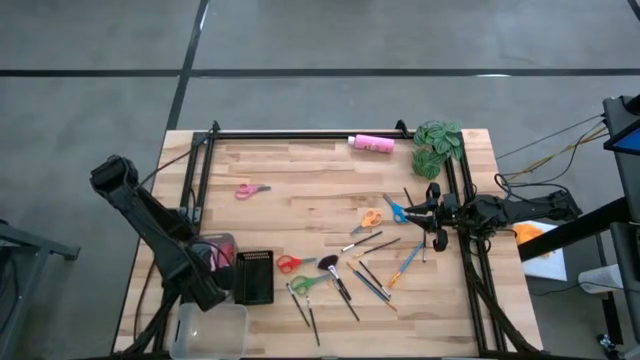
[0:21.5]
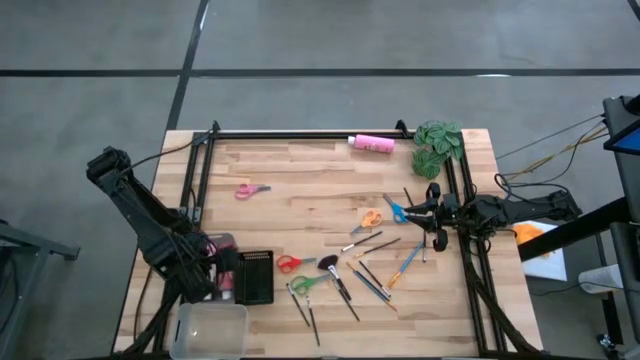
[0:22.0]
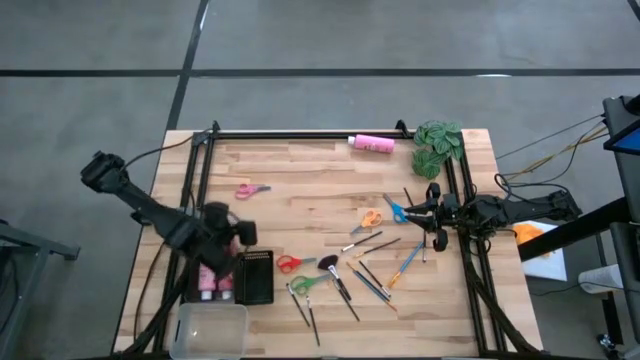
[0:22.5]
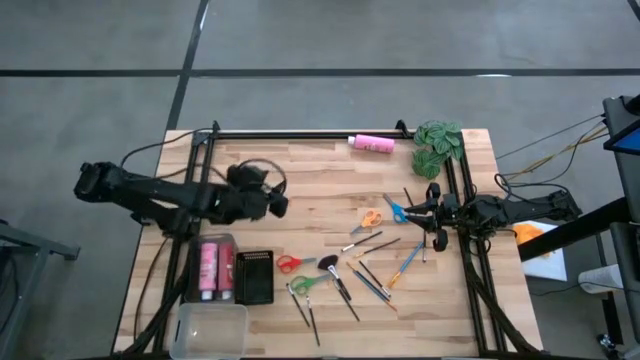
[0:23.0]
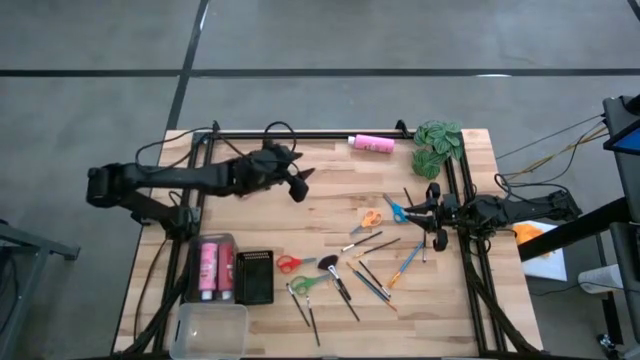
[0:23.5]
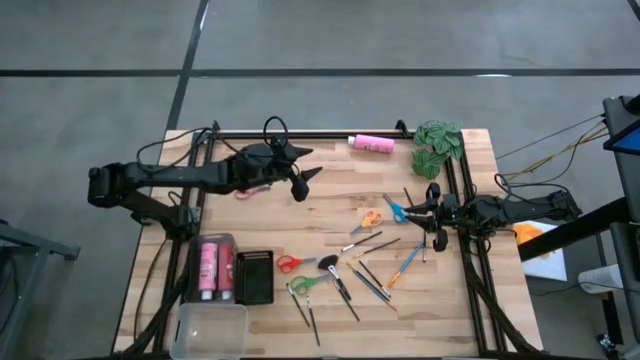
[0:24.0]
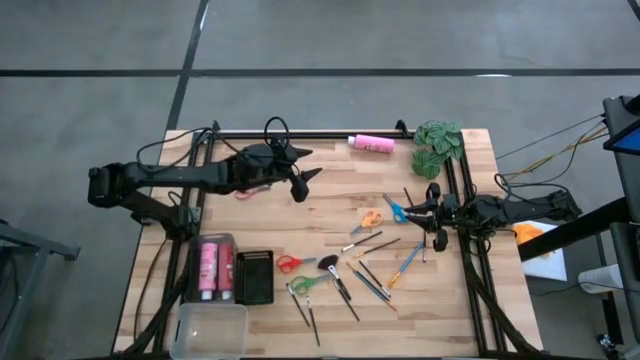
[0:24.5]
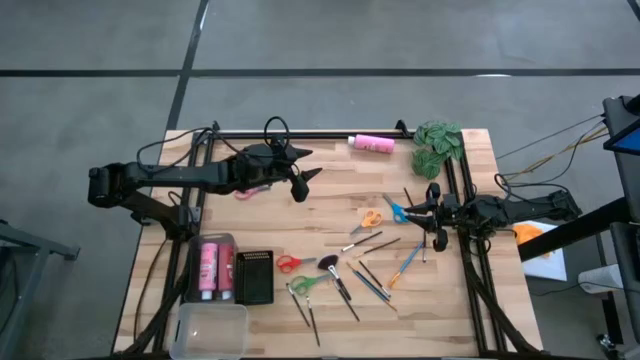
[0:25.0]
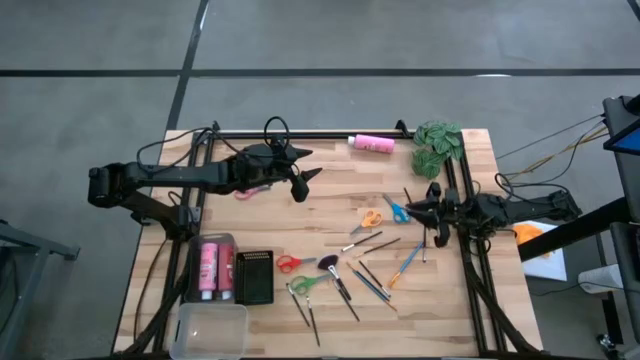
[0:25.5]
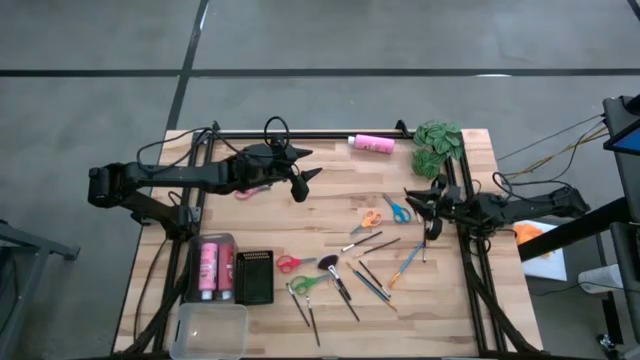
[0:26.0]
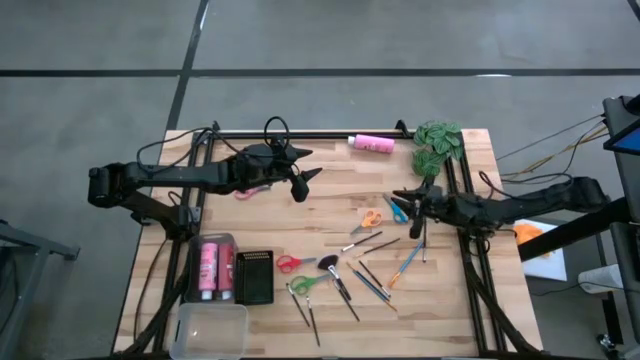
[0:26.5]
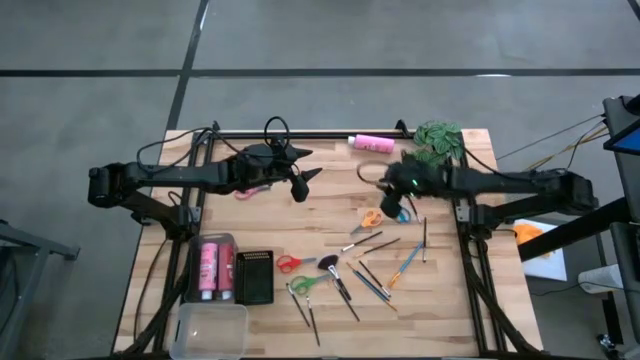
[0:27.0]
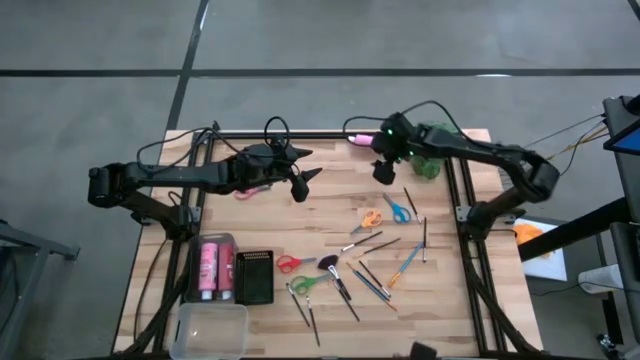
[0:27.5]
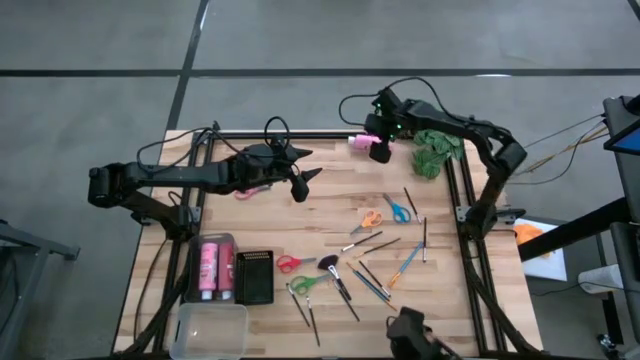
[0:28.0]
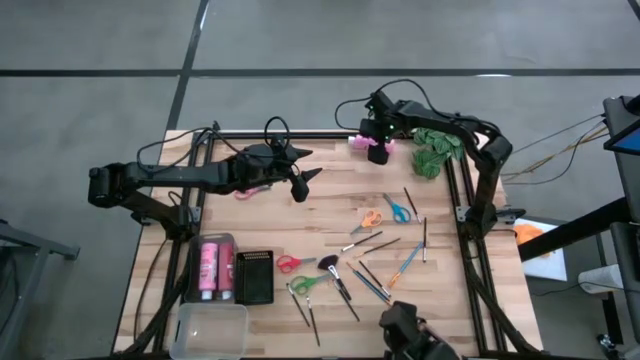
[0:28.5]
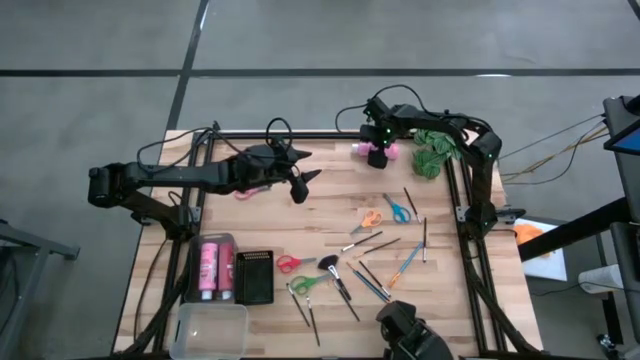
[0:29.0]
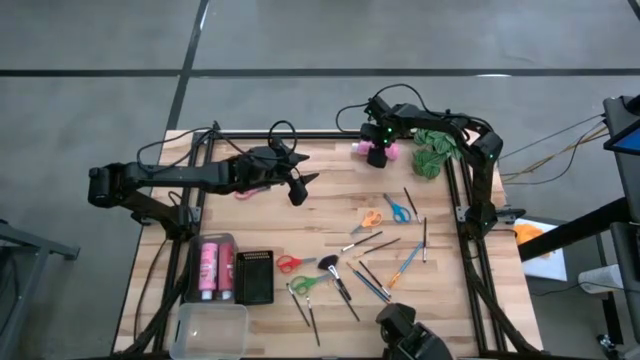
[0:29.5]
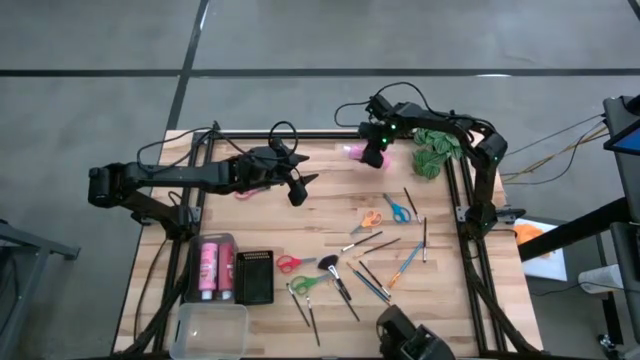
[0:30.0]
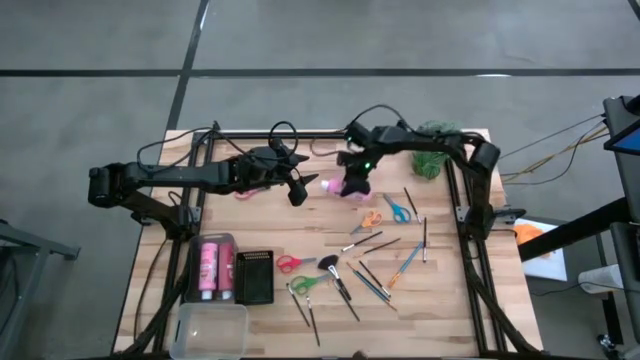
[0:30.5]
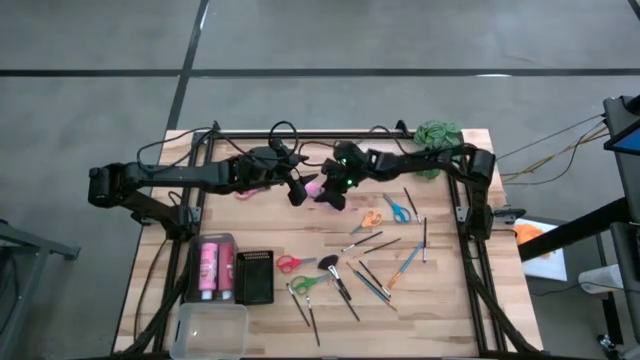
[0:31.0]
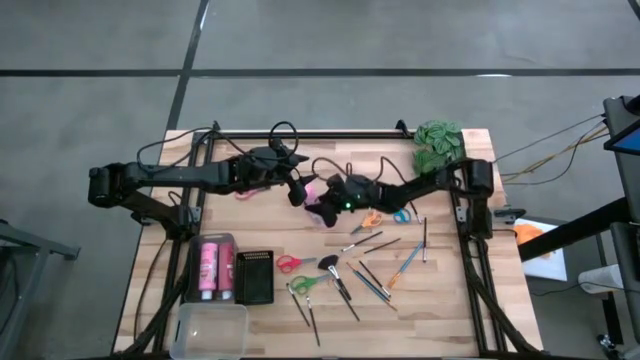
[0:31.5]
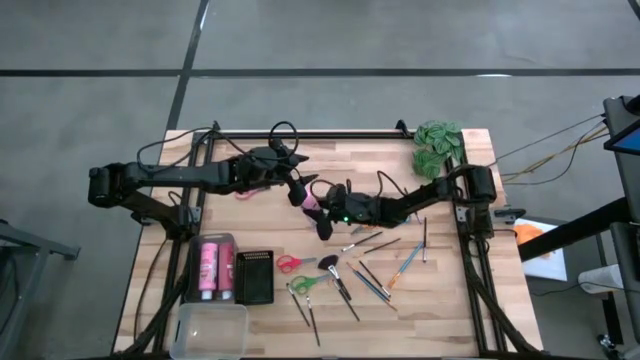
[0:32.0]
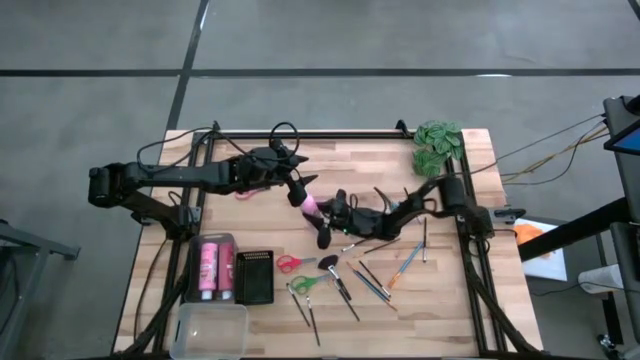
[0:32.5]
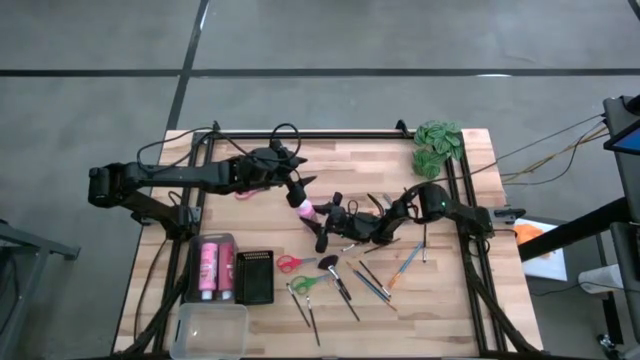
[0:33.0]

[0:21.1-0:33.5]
Task: Pick & Place Paint Supplies
Put the pink paint bottle into the gray bin

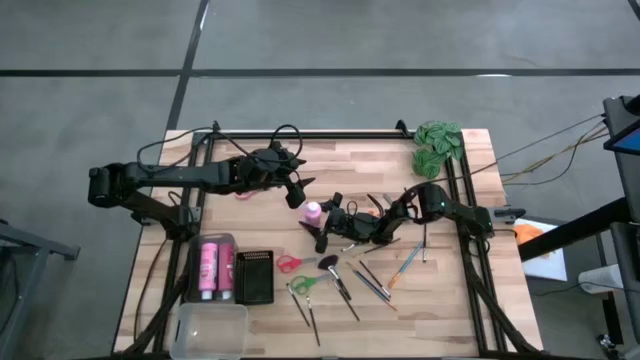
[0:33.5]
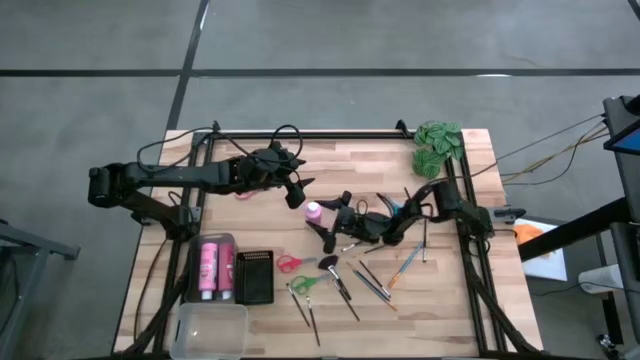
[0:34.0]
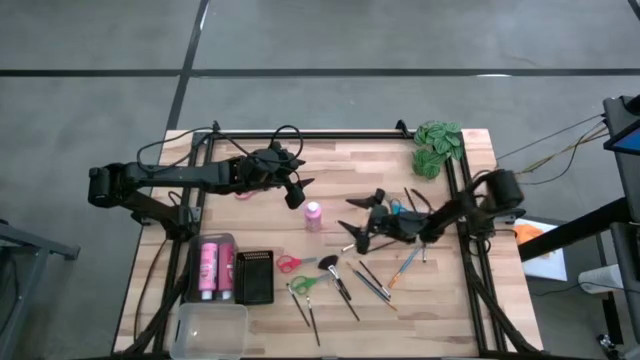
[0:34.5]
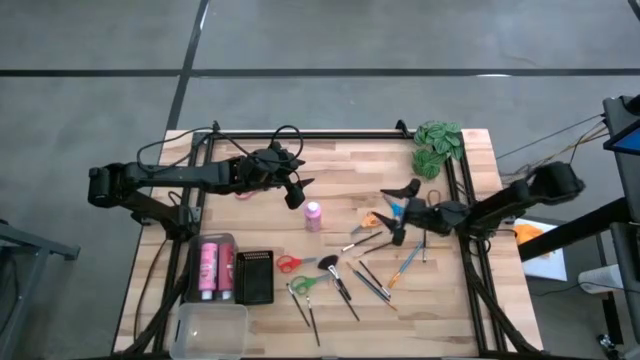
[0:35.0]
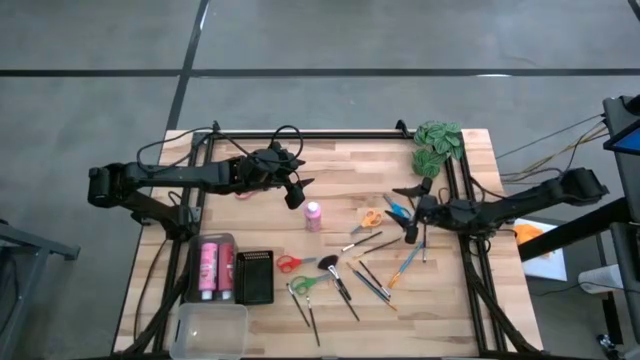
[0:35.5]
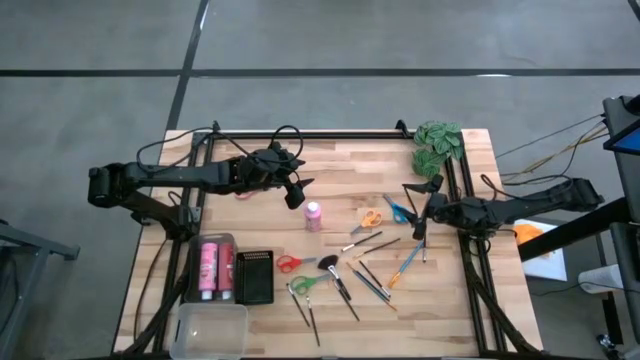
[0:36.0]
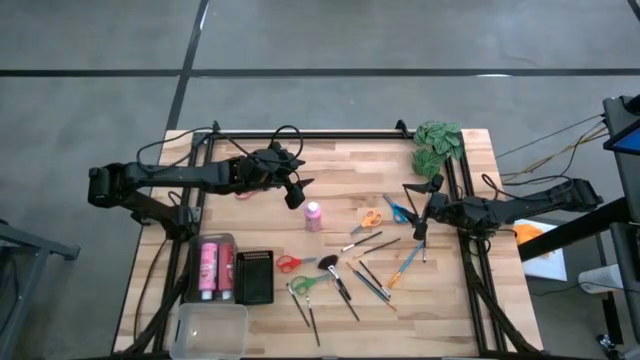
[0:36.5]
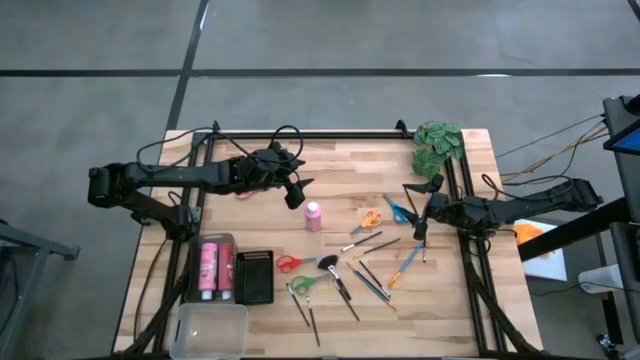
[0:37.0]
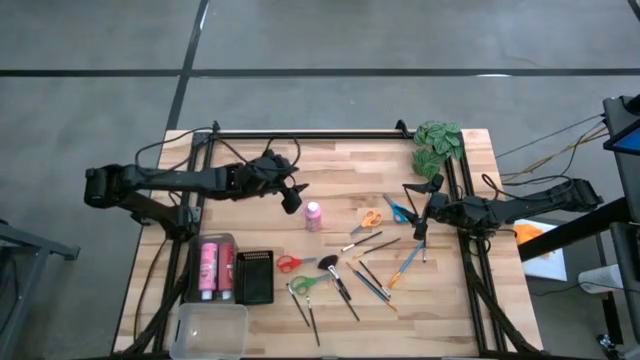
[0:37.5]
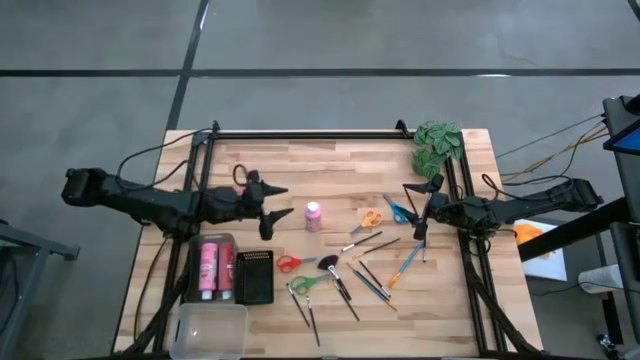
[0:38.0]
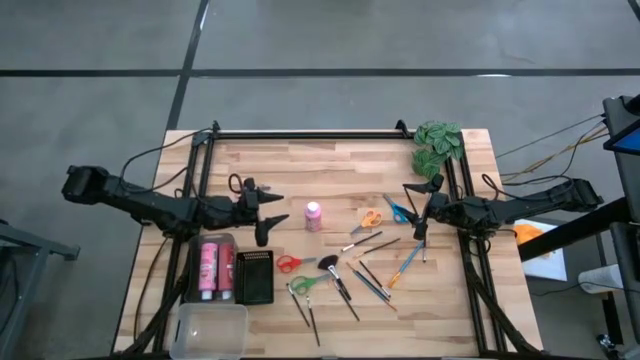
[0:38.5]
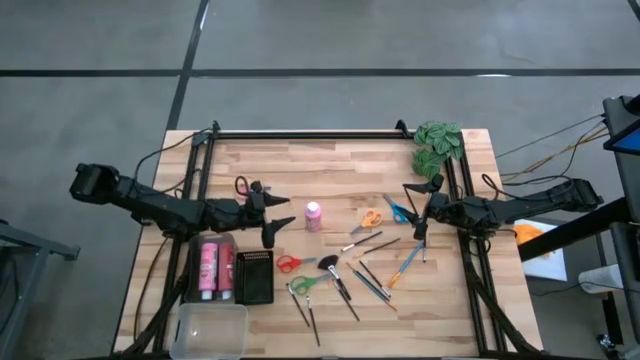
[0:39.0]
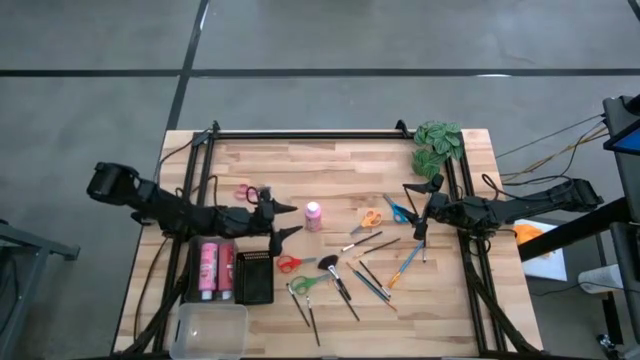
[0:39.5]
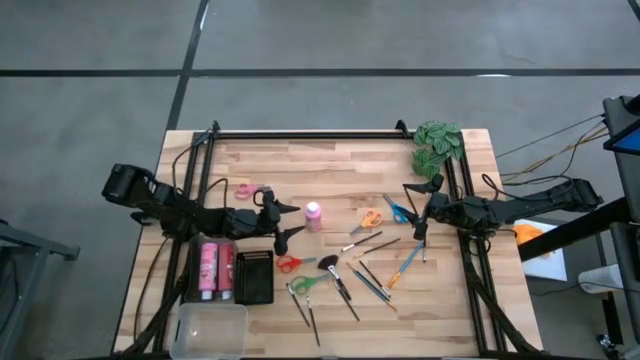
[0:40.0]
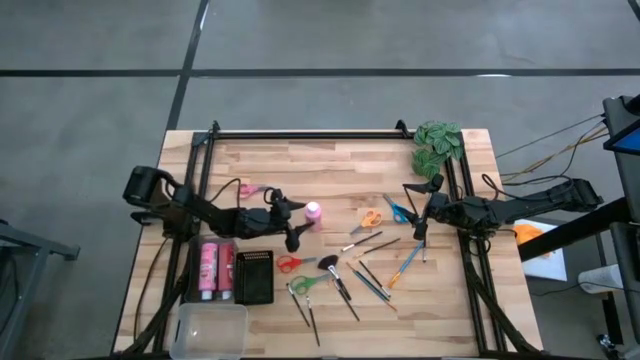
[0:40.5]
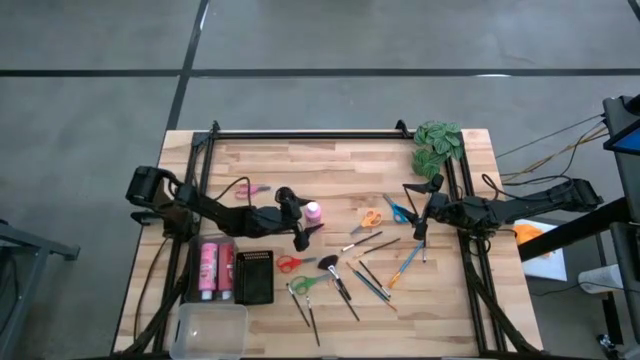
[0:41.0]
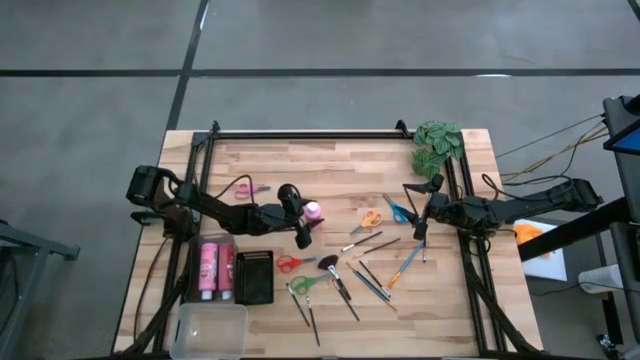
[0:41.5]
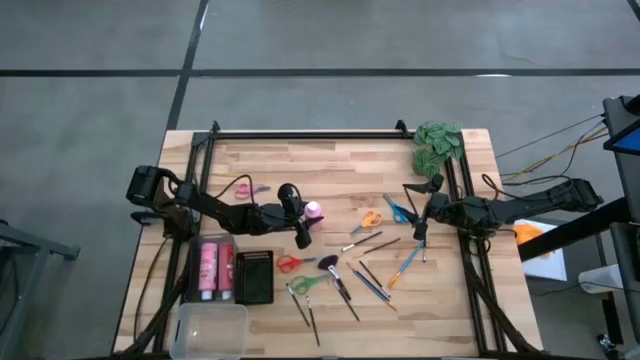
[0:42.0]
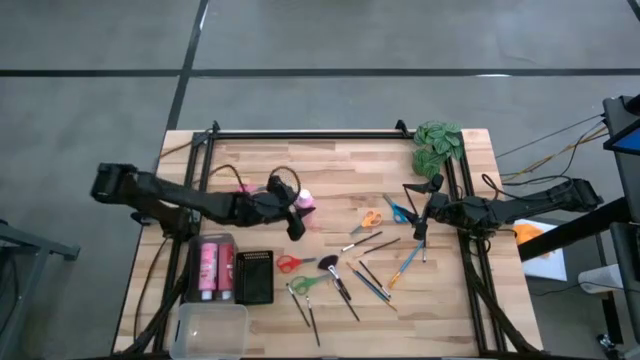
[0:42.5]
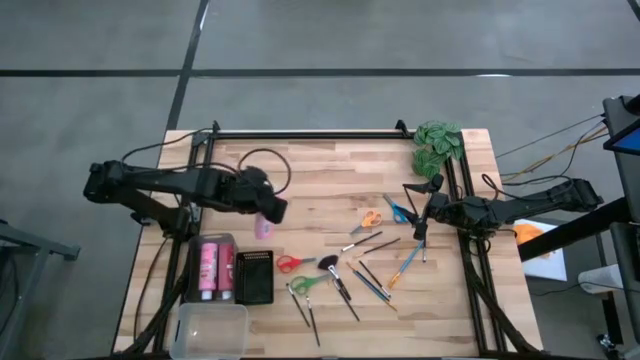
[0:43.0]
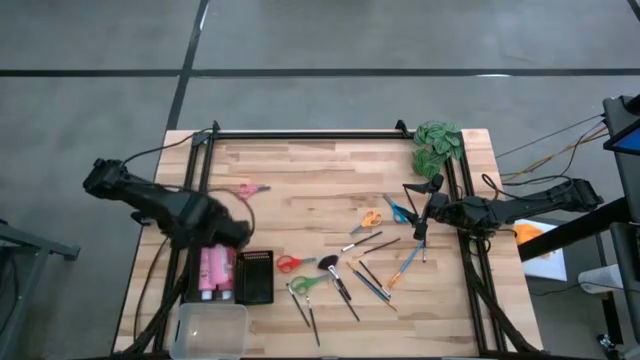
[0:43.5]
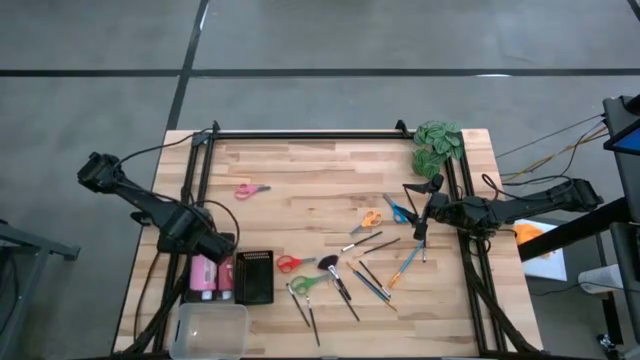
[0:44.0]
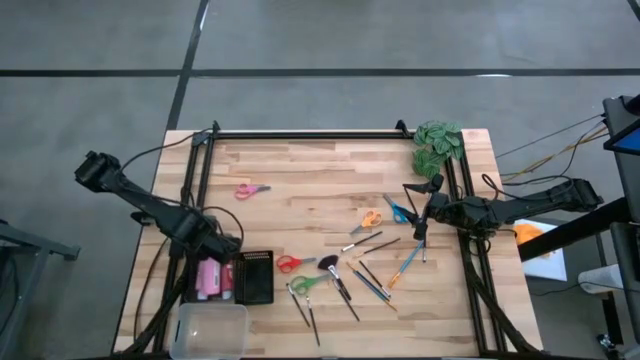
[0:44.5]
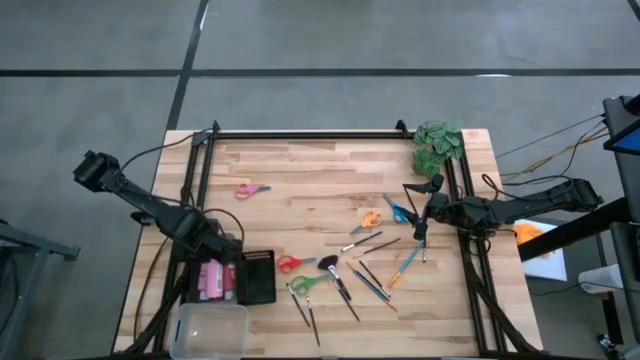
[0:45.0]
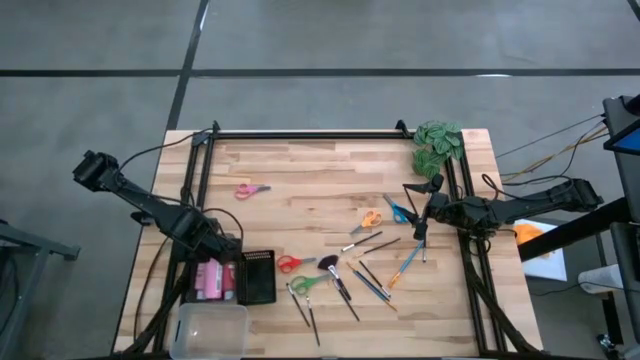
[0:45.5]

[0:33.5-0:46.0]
Put the pink paint bottle into the gray bin
